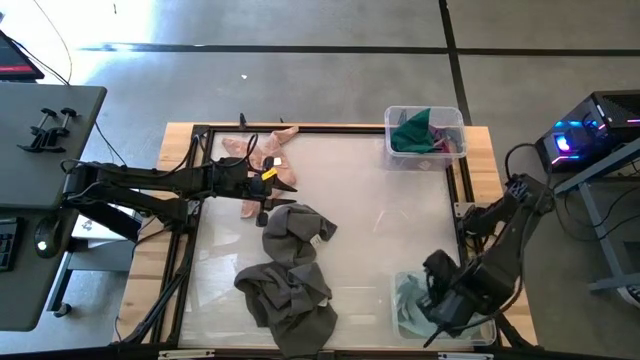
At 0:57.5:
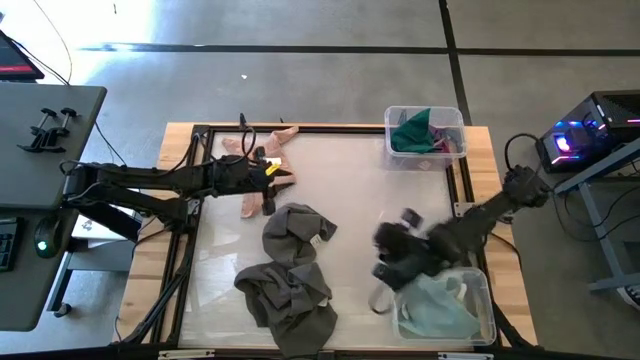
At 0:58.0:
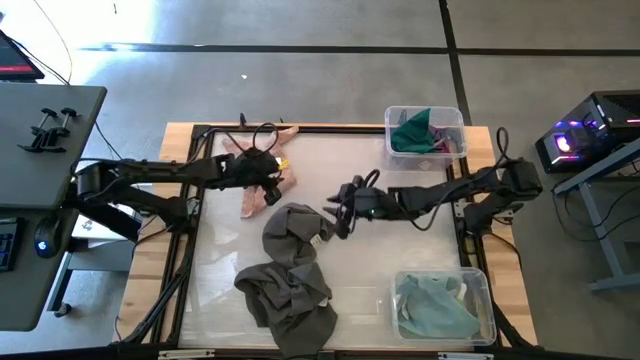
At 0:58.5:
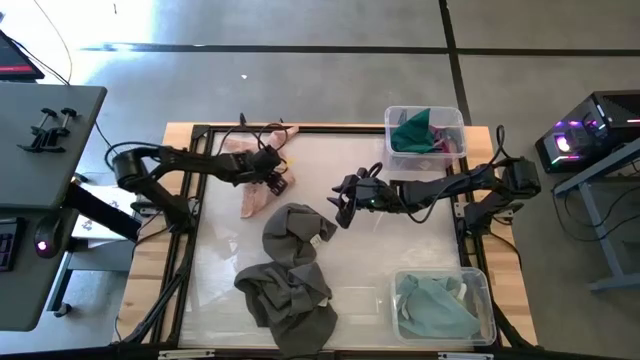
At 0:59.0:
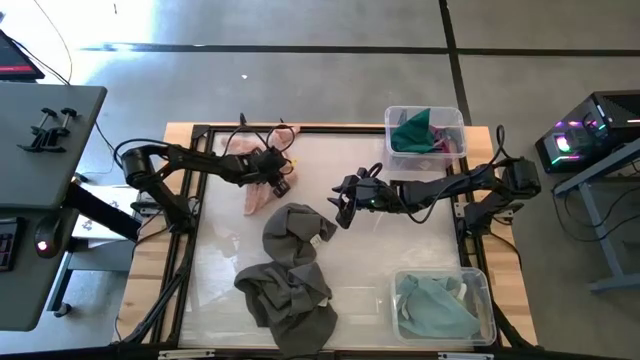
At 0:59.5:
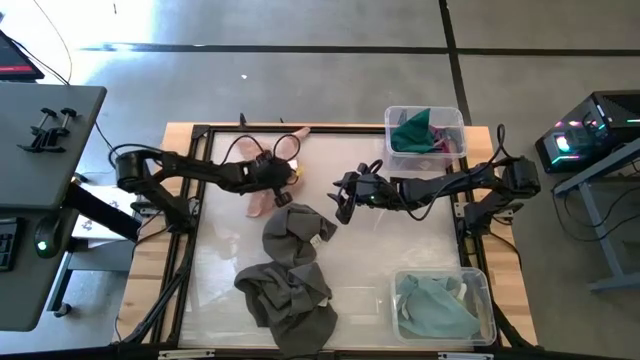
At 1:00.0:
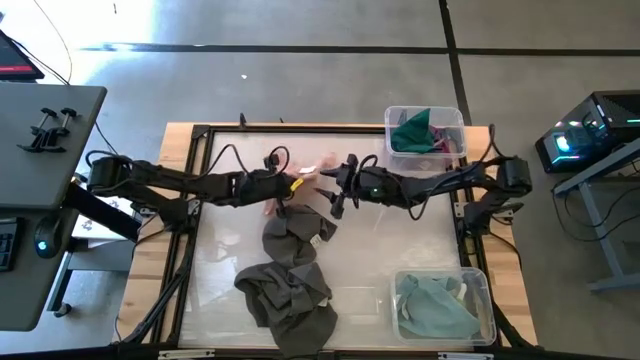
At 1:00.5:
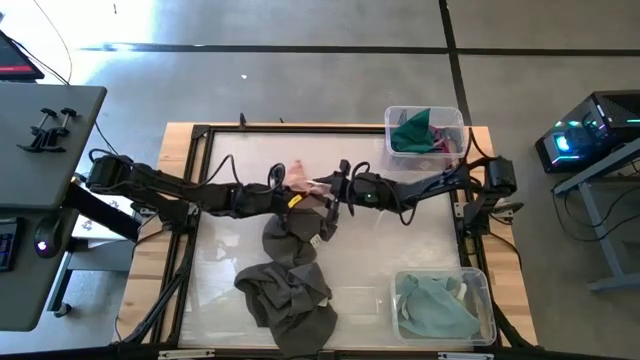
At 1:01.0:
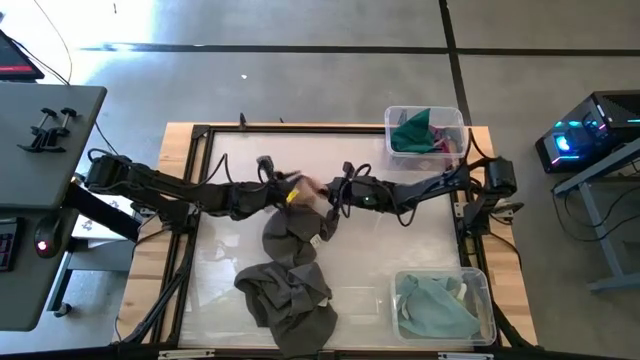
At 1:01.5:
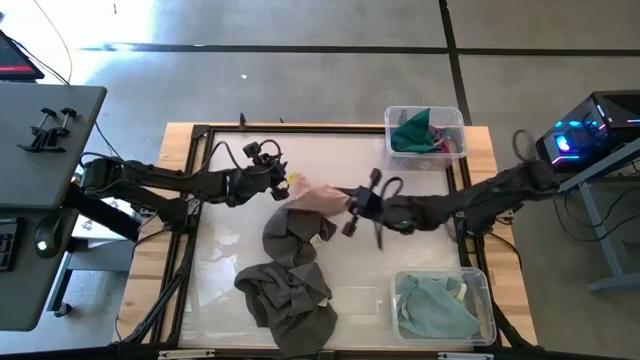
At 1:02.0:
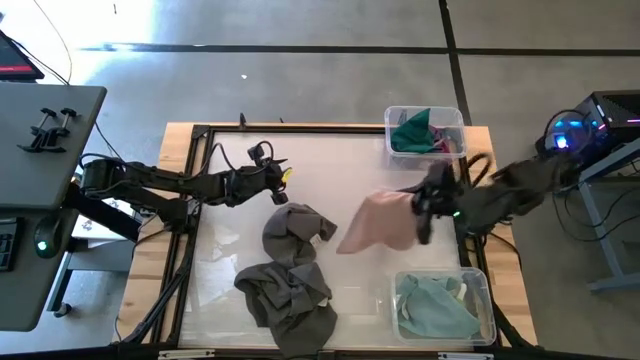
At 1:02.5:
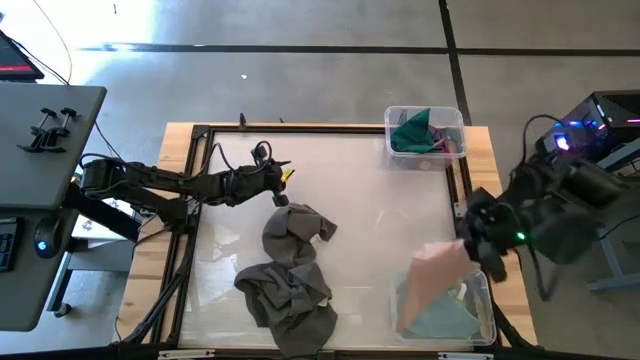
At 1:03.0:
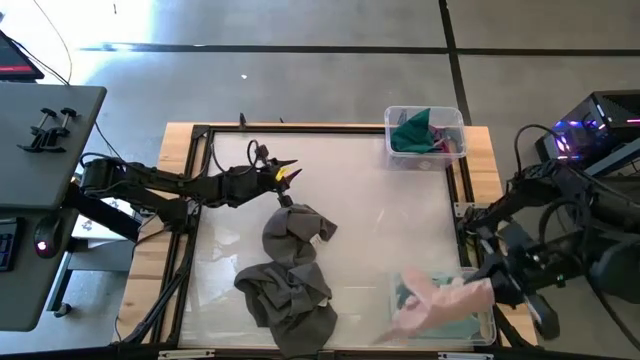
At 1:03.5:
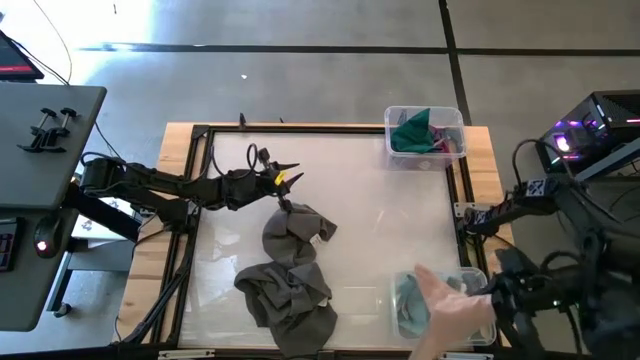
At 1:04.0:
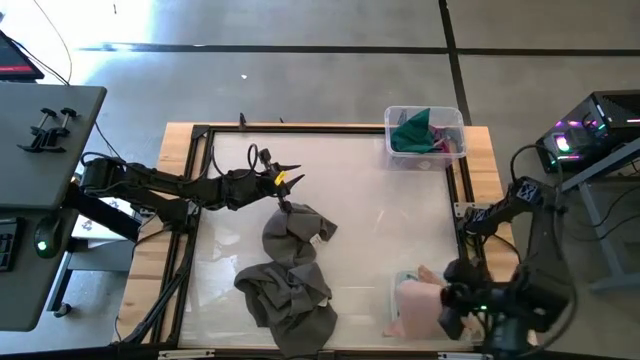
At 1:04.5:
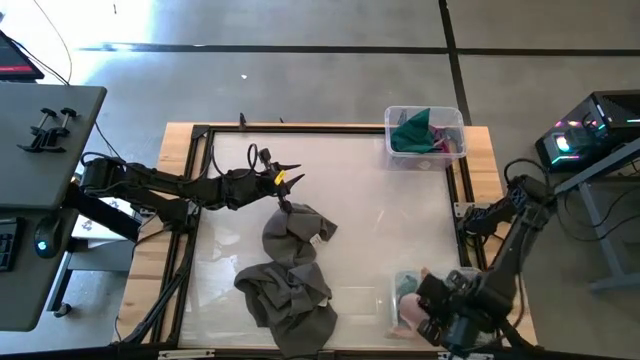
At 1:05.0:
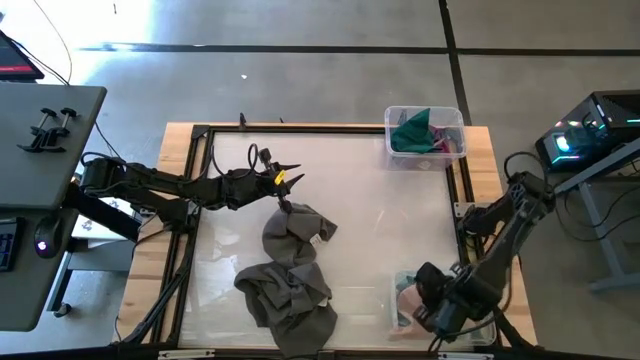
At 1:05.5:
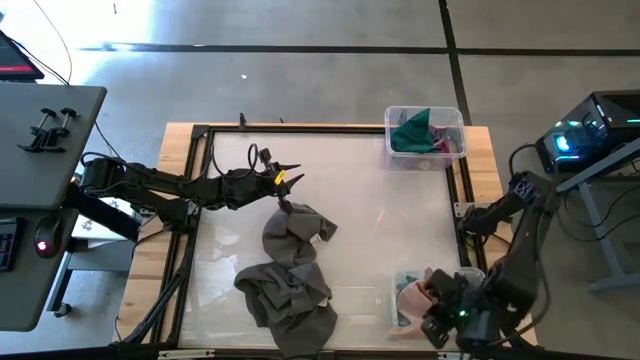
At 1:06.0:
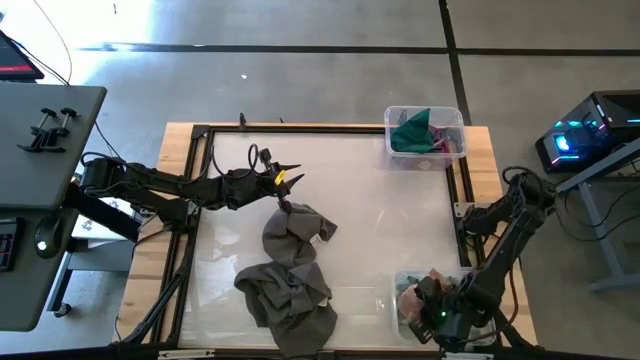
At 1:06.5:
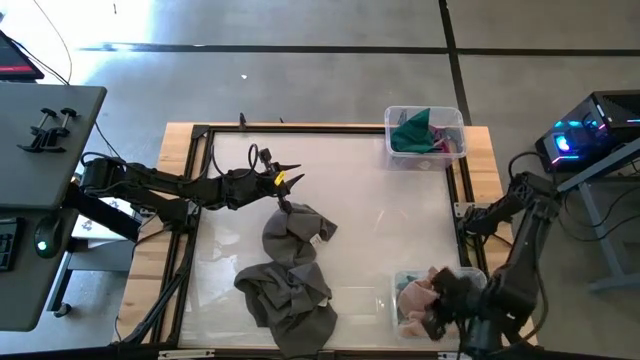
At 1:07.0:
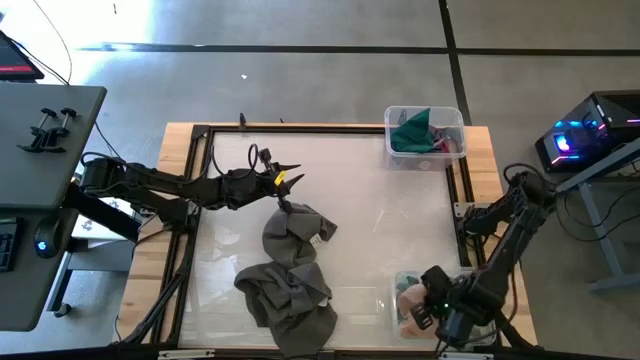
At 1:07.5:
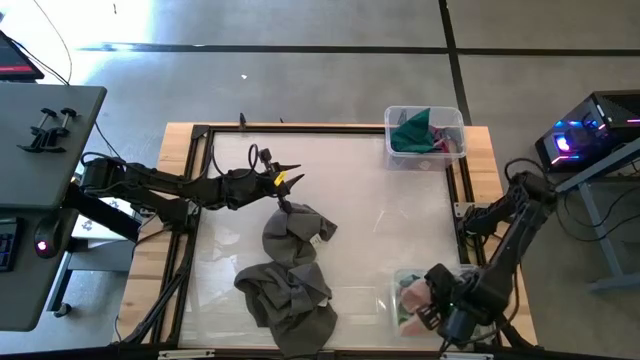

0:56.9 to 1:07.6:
Task: Sort towels by color in basket
Put the brown towel into the bottom transparent bin

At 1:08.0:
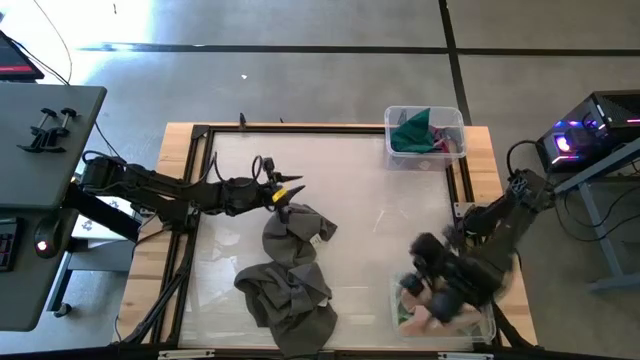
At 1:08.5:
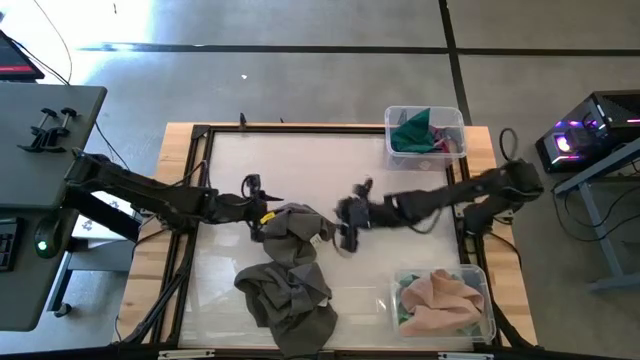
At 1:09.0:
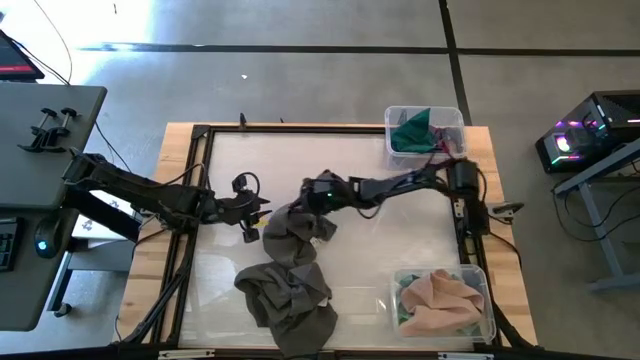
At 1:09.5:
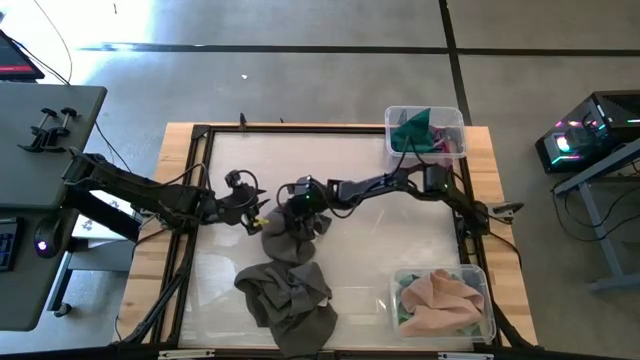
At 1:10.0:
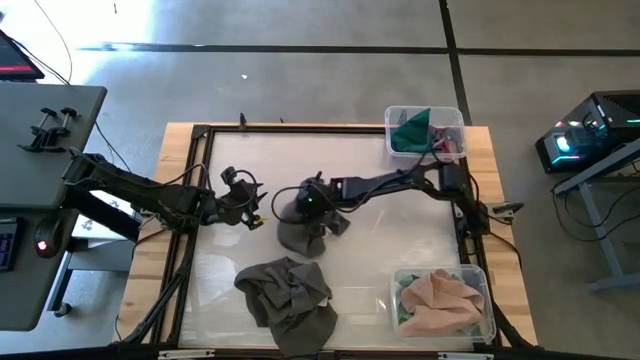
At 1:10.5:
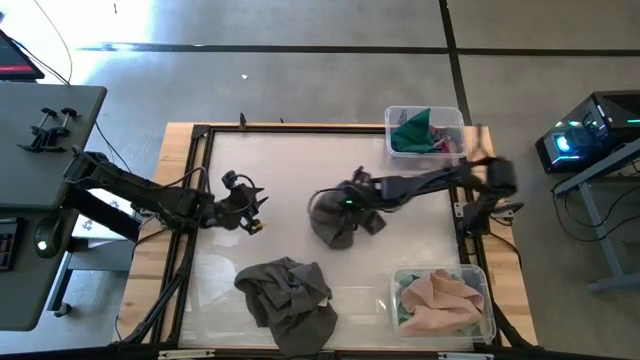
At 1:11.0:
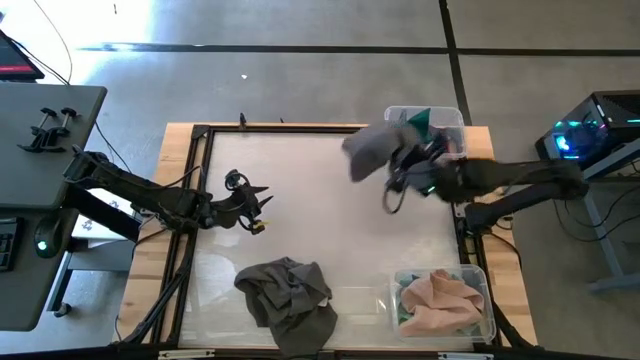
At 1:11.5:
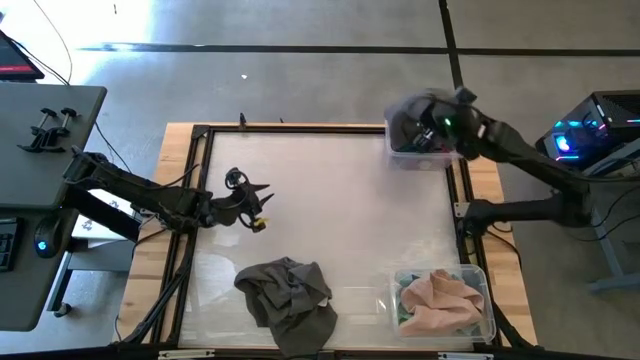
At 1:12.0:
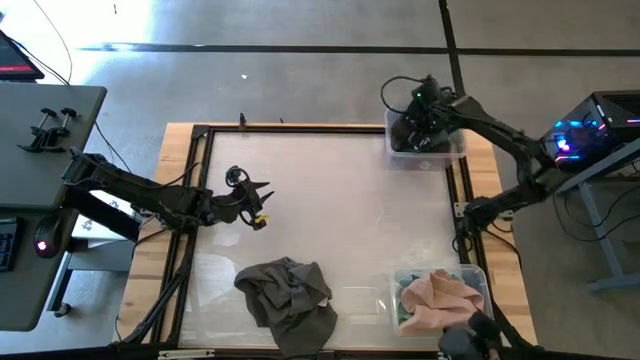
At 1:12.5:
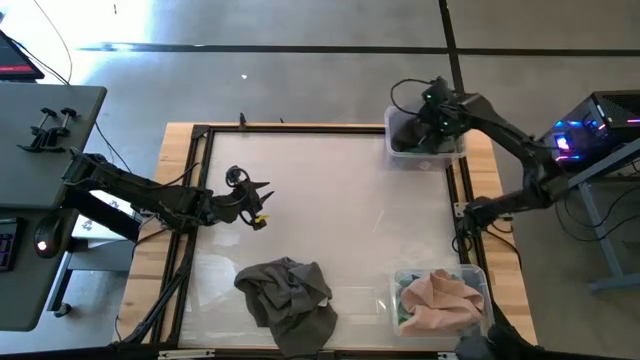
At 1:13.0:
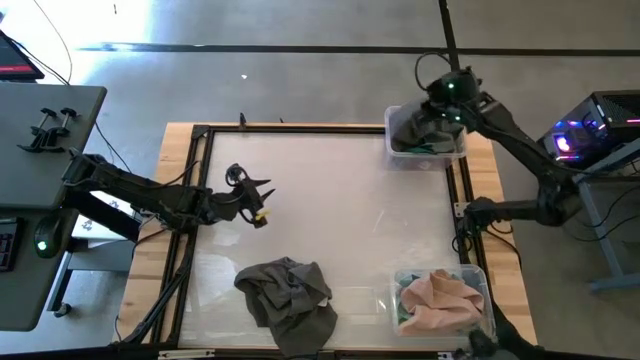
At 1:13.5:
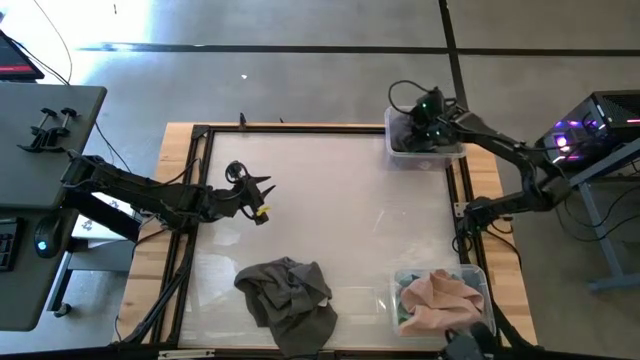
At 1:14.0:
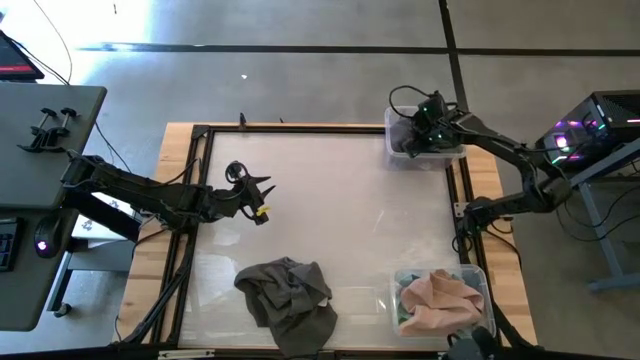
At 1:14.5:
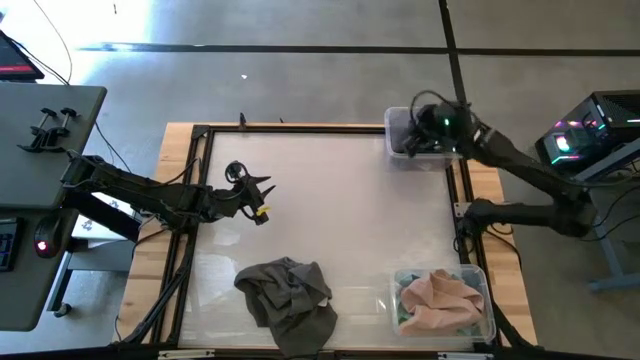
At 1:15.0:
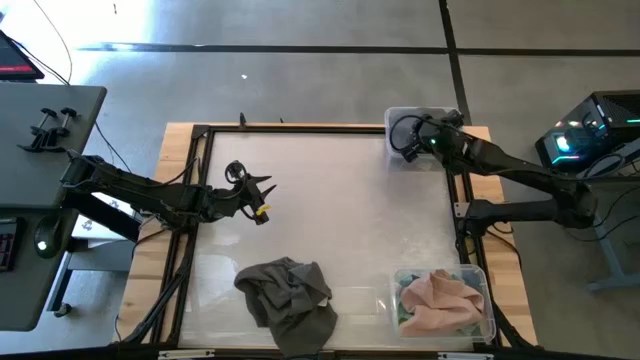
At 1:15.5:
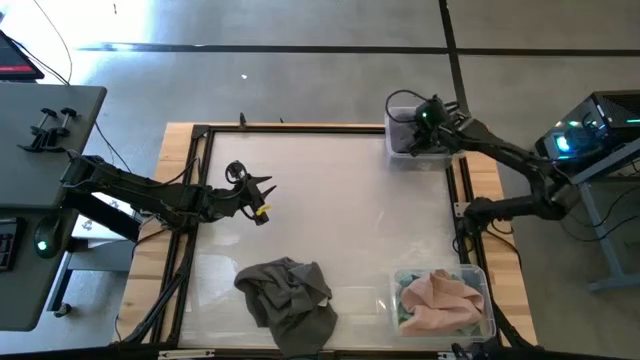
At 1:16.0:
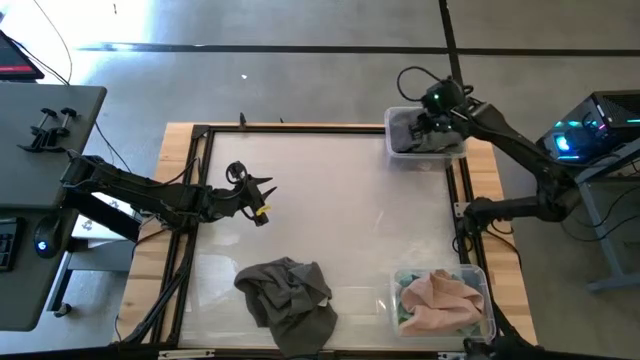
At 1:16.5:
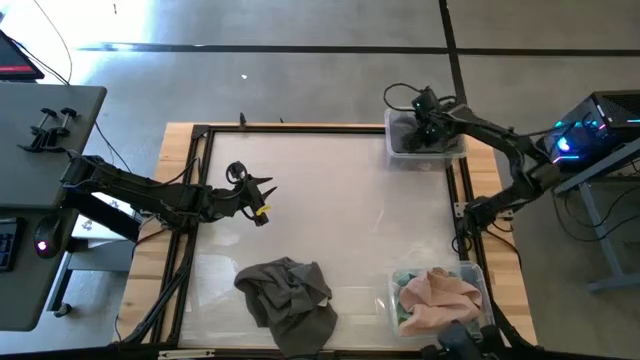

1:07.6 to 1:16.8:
Put the top black towel into the top transparent bin
